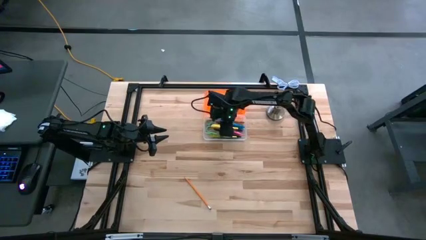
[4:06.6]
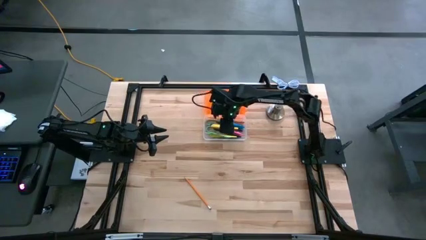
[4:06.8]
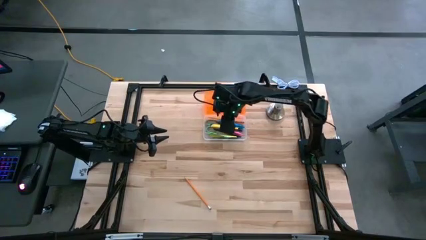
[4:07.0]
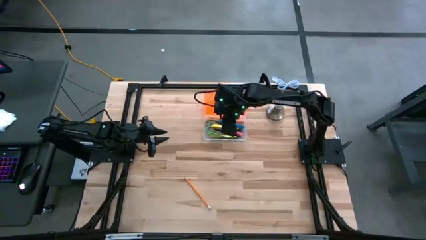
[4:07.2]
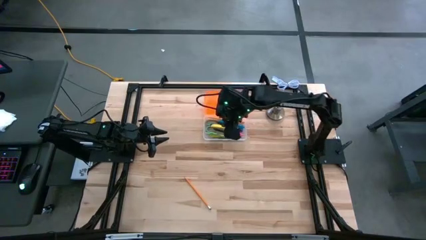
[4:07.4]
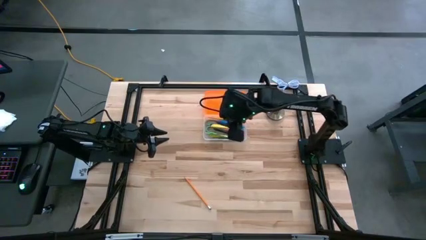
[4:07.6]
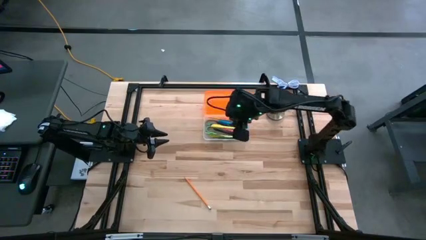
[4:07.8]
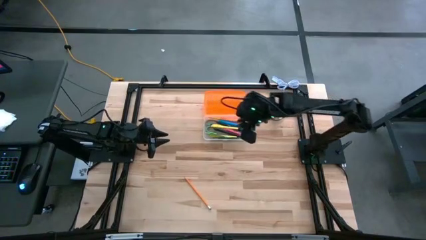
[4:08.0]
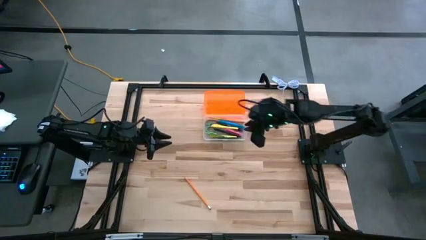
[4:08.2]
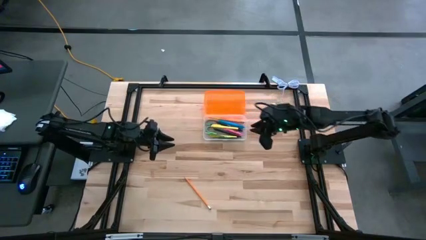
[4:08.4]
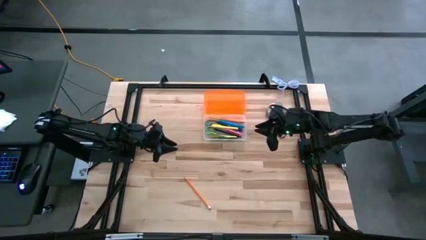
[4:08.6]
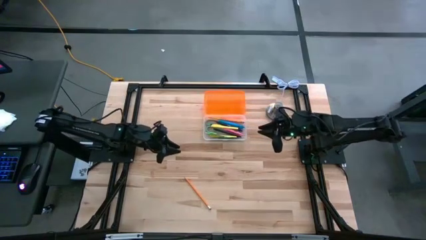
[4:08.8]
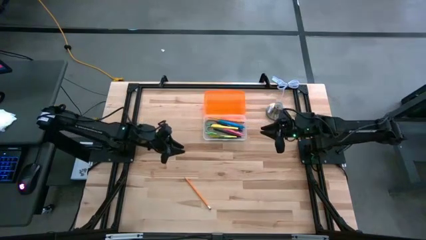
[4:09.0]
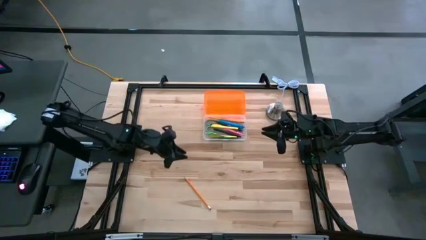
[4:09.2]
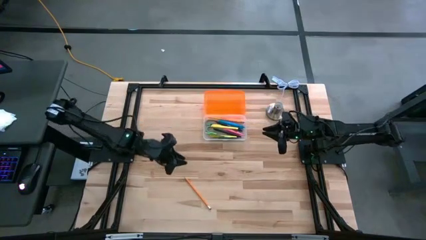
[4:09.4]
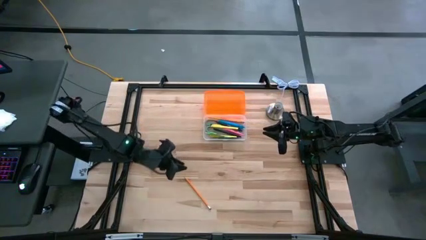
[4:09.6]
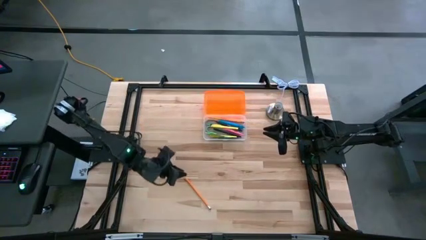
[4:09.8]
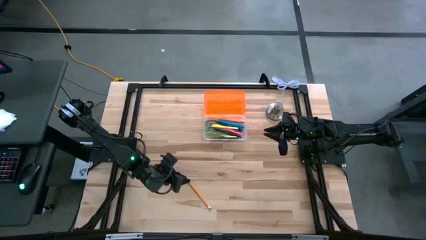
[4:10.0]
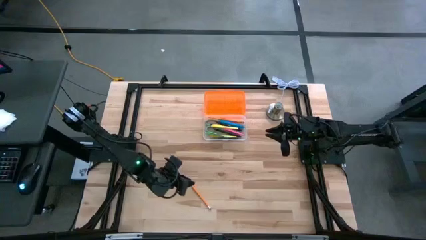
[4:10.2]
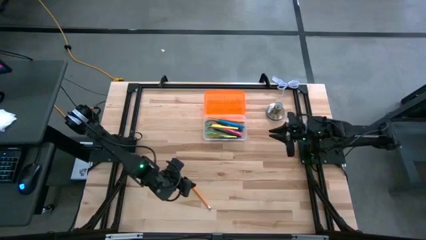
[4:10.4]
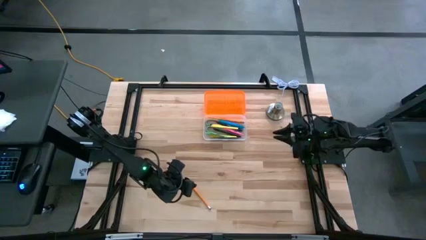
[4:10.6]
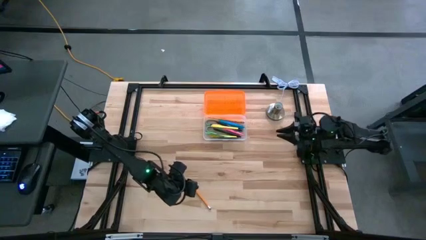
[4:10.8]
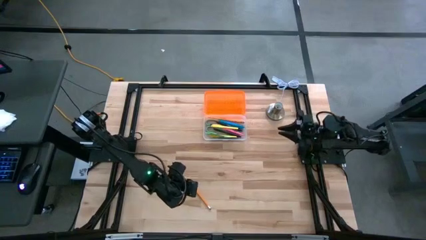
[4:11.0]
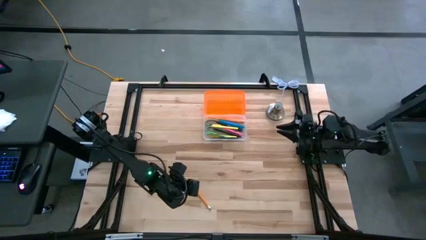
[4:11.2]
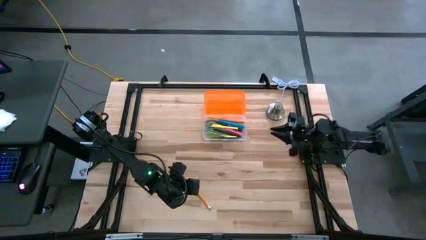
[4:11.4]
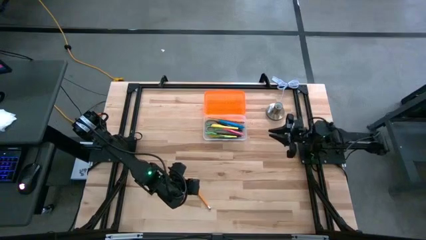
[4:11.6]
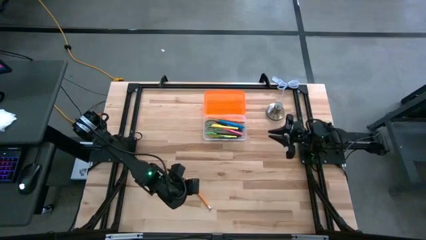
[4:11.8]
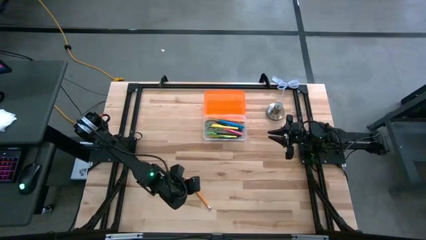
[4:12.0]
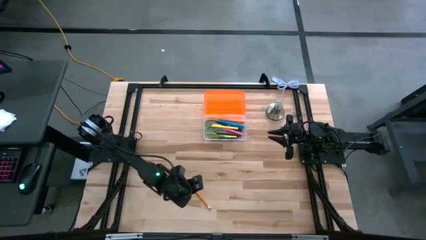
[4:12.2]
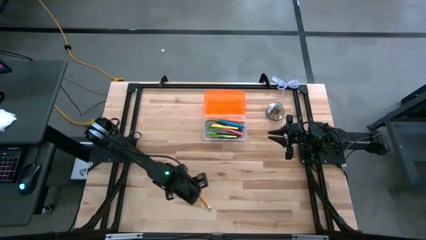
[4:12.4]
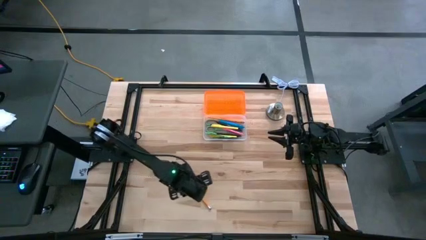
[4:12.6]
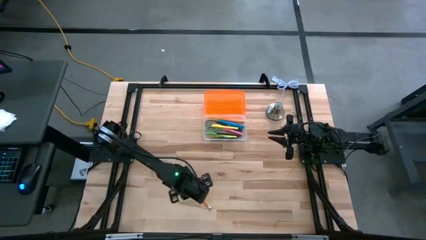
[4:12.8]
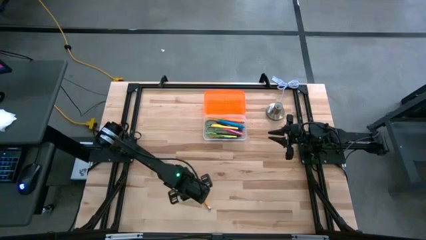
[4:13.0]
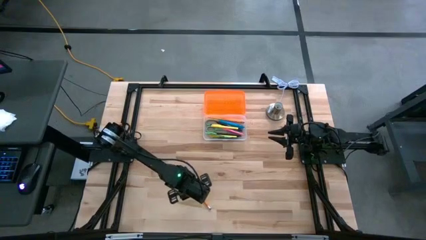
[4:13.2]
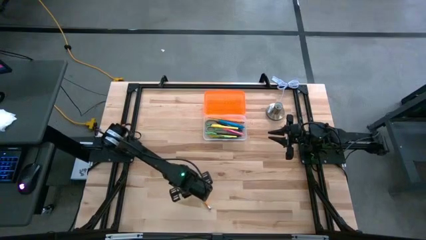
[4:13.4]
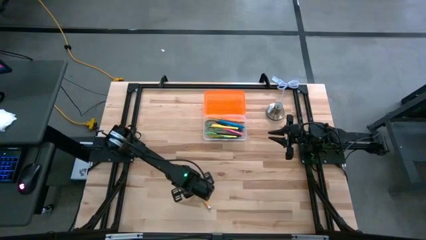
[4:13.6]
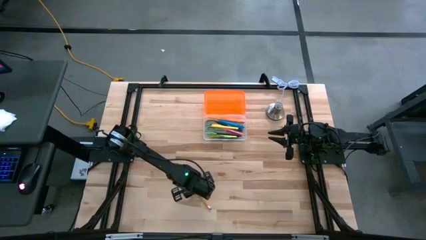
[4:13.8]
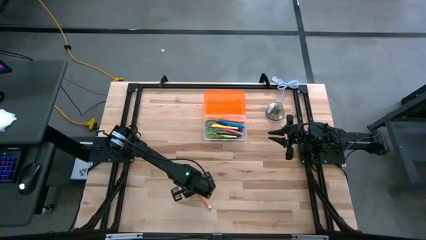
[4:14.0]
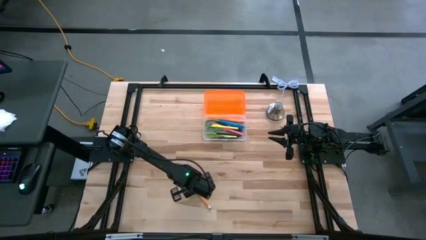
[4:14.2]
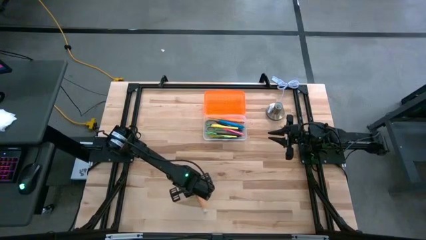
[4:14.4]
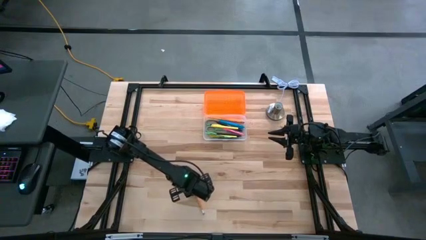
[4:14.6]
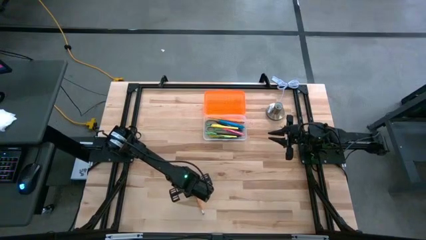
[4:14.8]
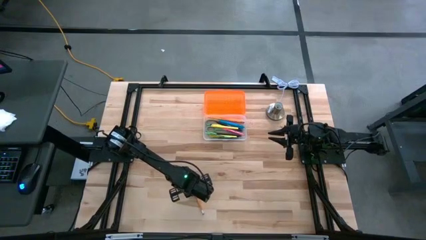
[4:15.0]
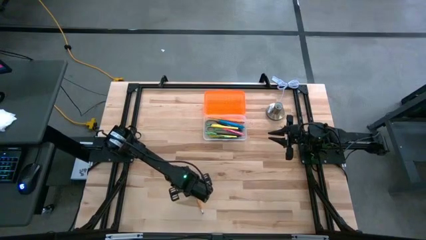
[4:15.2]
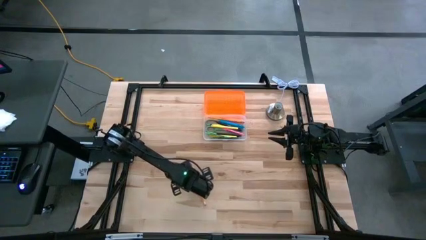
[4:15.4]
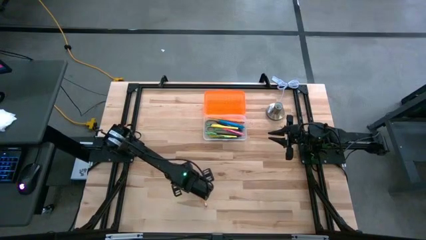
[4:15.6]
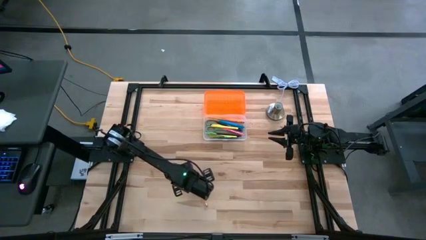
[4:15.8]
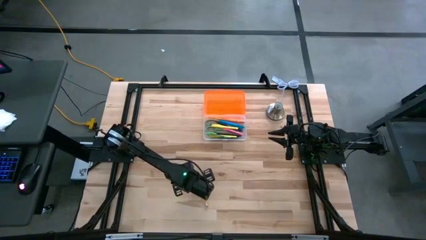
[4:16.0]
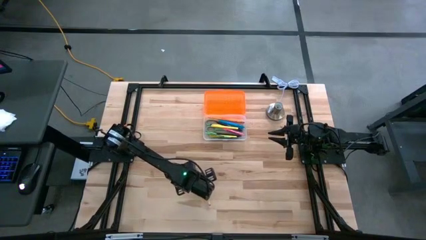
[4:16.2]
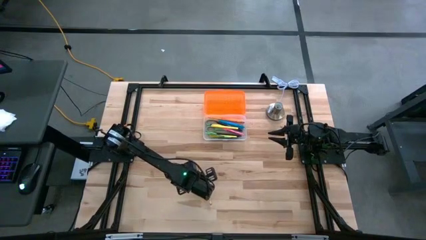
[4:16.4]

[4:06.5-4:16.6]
Task: Pick & place school supplies into a supply box
Put the orange pencil into the supply box

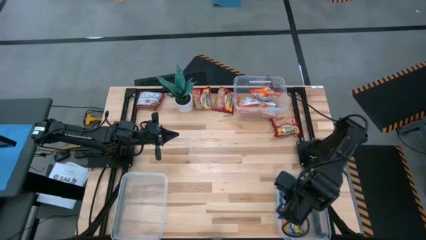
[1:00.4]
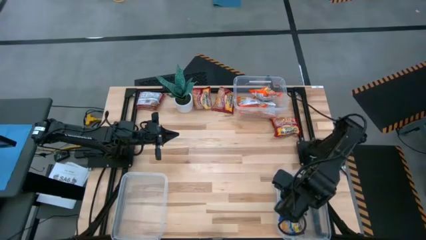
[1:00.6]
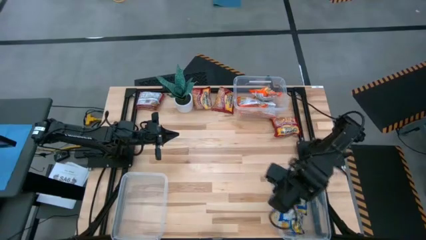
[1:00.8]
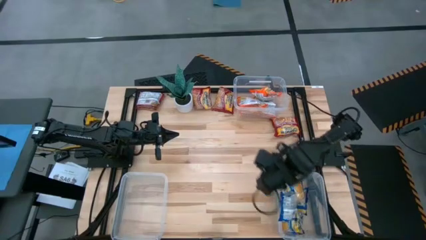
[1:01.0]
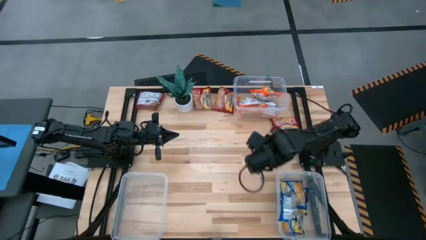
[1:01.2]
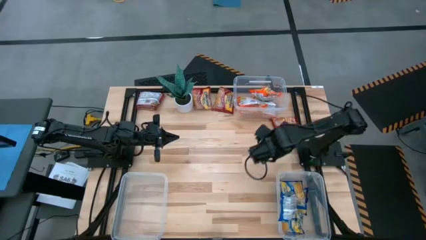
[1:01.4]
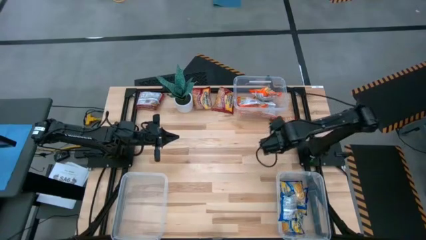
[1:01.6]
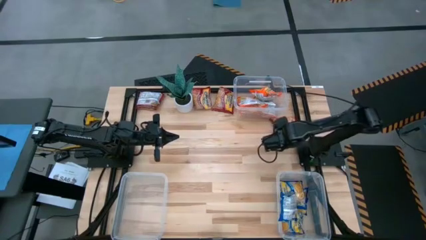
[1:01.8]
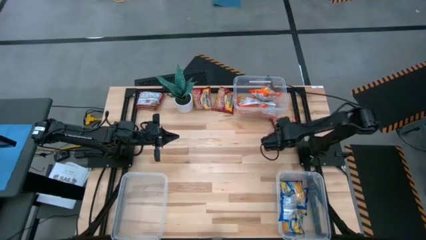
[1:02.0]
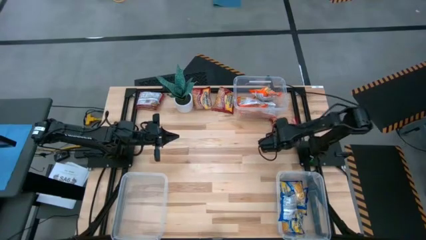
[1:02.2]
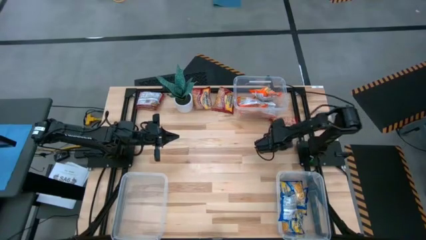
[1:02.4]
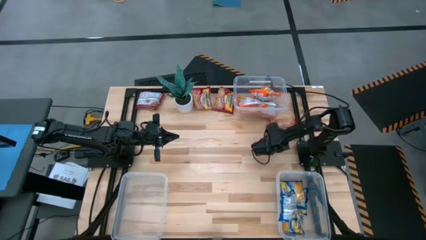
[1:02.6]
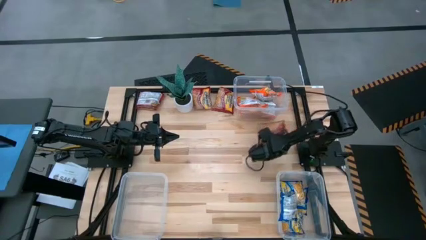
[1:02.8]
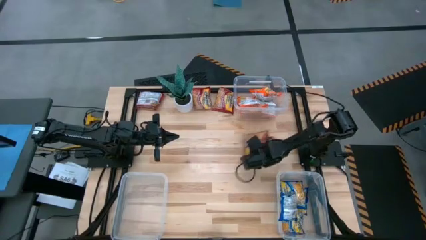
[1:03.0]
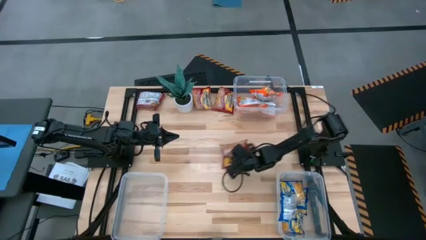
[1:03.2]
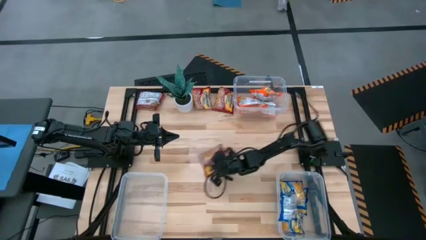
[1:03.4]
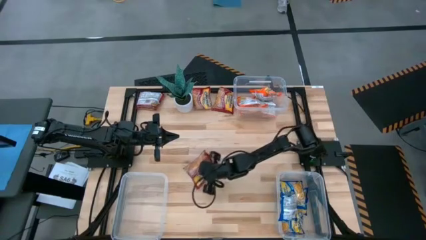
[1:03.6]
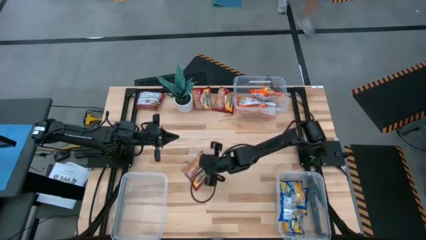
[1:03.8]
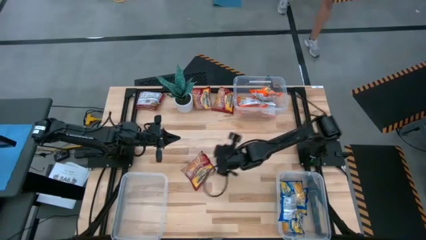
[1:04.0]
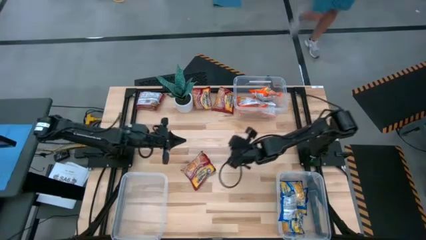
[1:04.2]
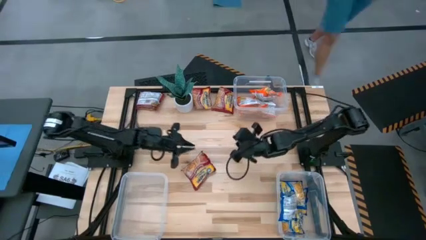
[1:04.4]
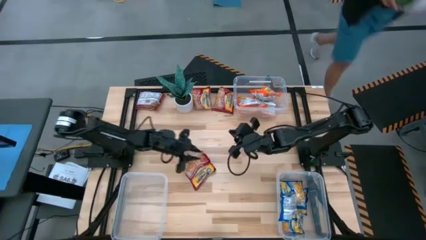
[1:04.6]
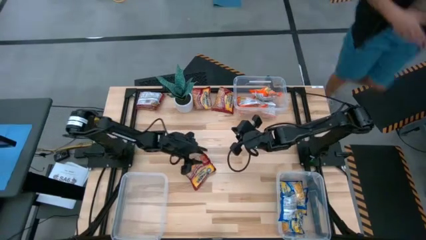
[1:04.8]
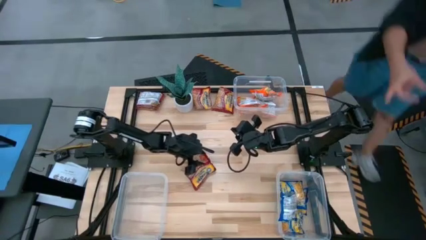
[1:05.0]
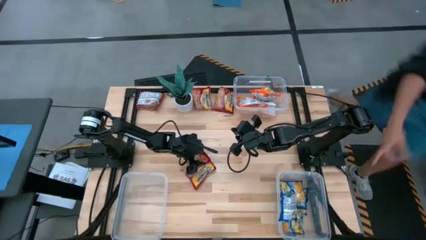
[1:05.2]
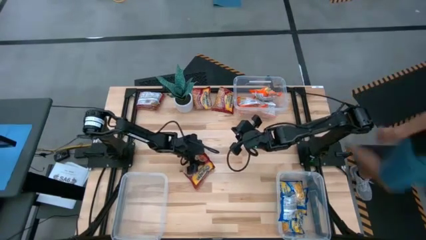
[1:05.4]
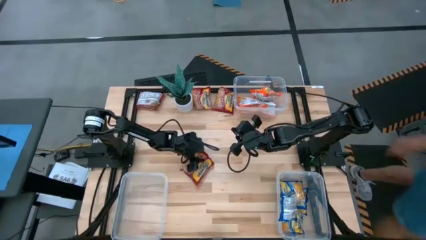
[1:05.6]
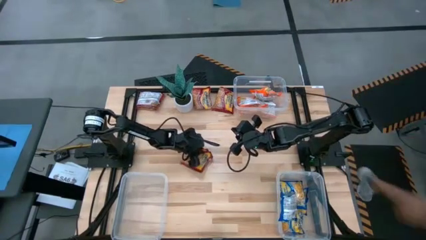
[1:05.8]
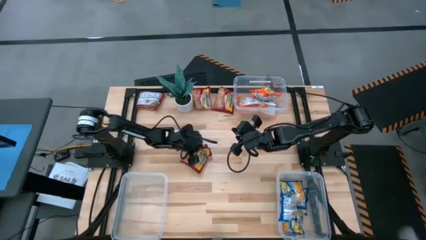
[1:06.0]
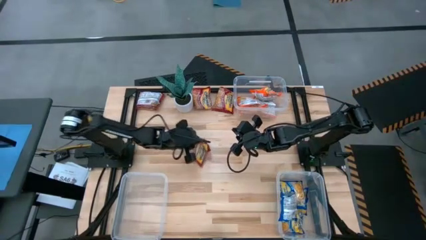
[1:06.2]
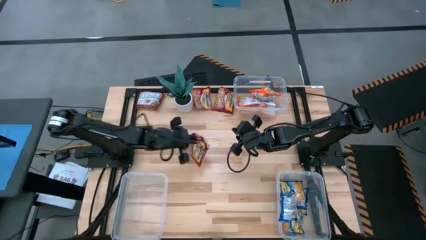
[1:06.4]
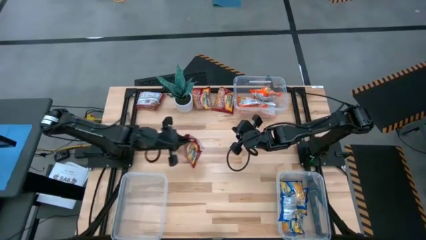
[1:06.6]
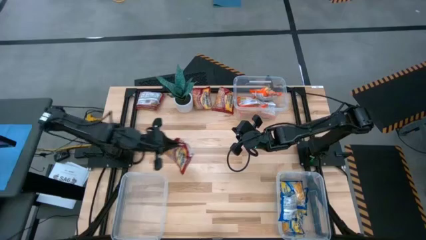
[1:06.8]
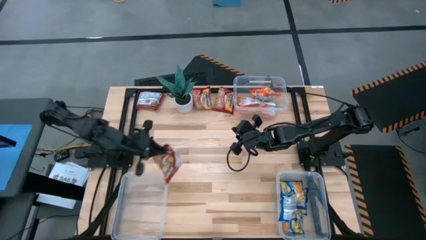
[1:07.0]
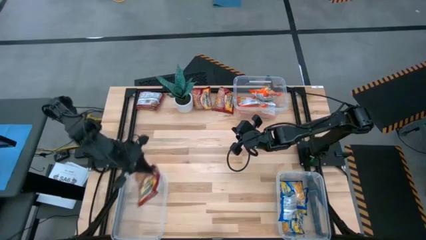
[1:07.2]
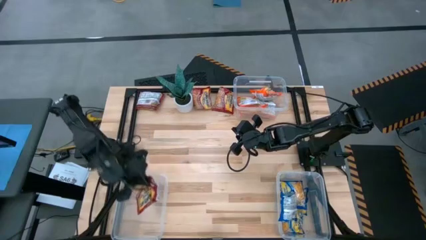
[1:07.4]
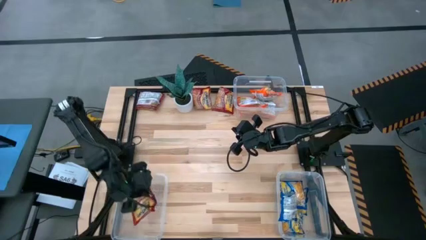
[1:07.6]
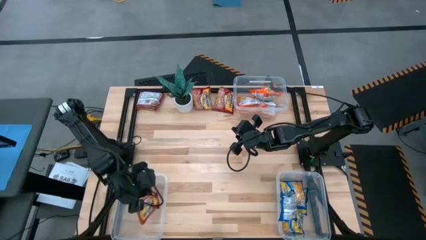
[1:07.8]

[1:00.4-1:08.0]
Task: Sort Maruchan noodles
Put the red noodle pack into the left bottom transparent bin
